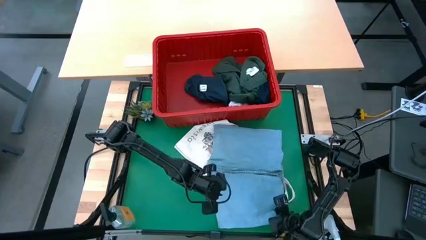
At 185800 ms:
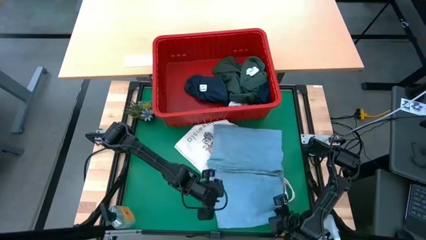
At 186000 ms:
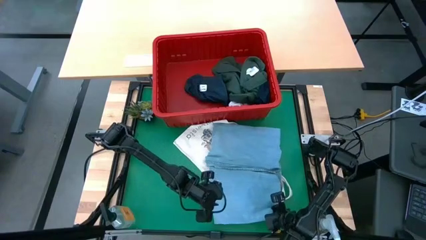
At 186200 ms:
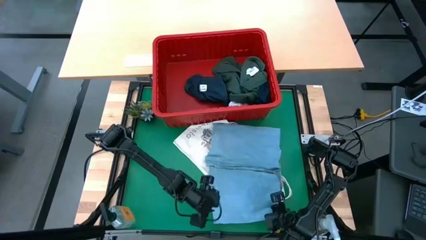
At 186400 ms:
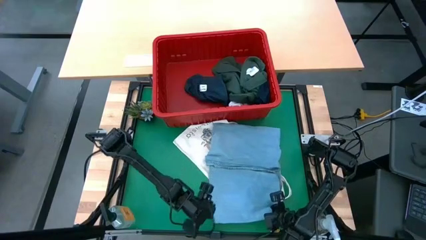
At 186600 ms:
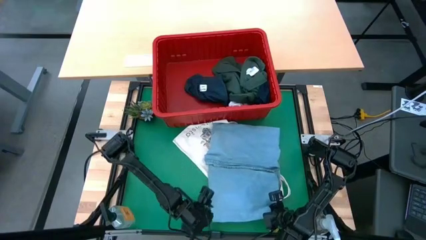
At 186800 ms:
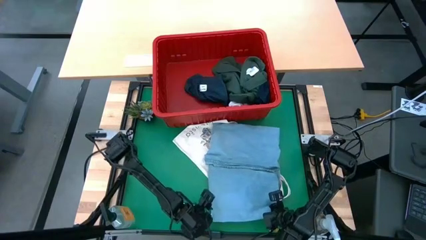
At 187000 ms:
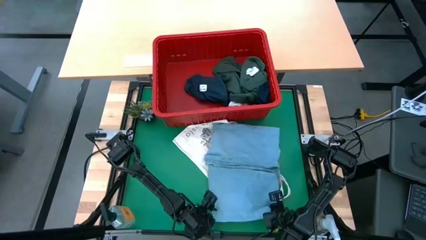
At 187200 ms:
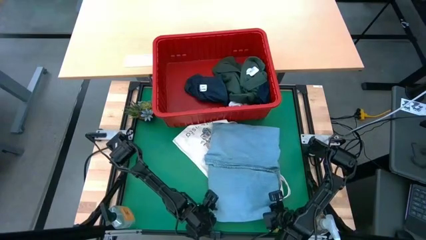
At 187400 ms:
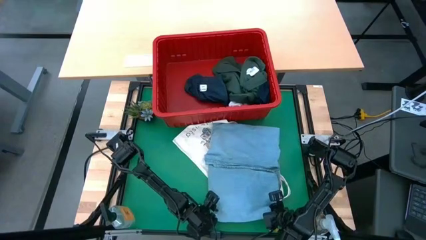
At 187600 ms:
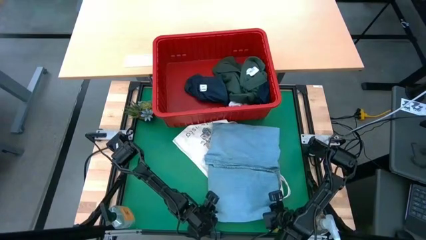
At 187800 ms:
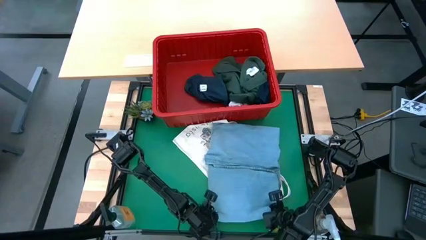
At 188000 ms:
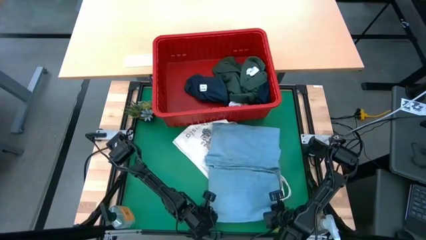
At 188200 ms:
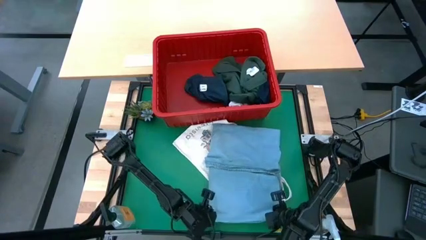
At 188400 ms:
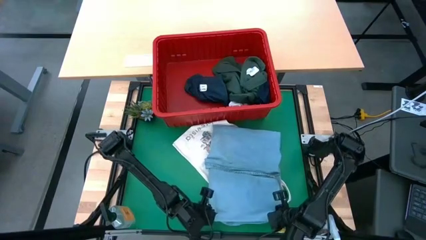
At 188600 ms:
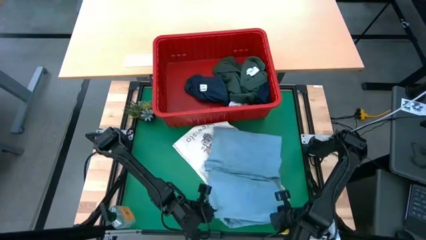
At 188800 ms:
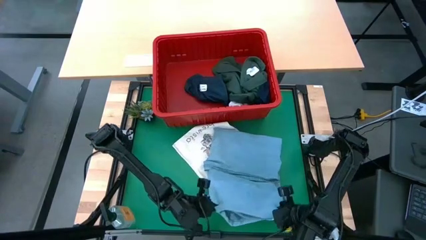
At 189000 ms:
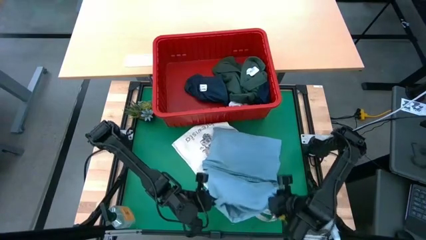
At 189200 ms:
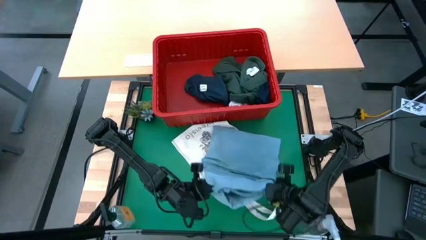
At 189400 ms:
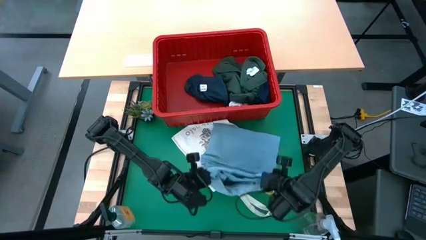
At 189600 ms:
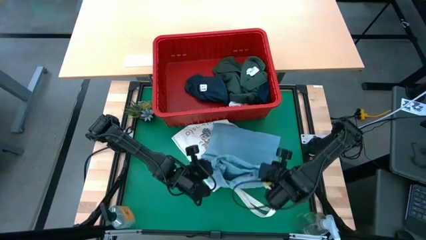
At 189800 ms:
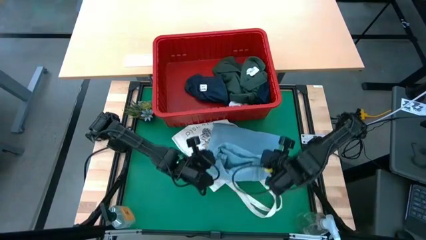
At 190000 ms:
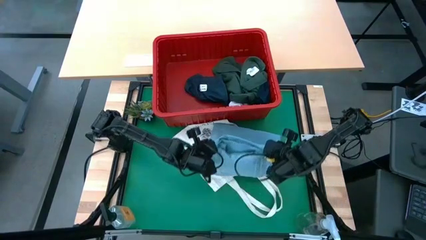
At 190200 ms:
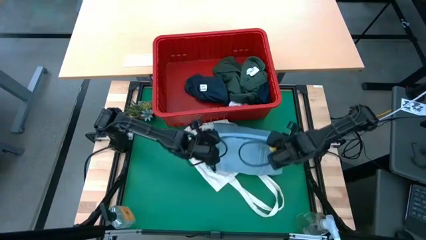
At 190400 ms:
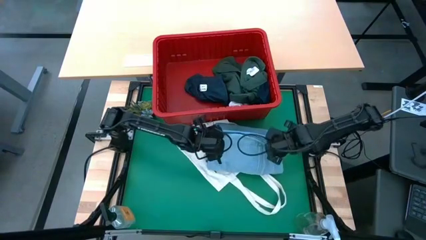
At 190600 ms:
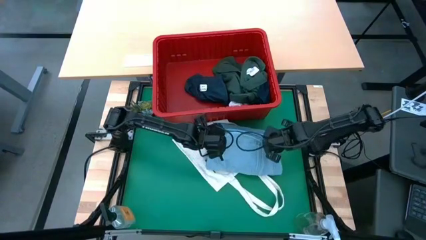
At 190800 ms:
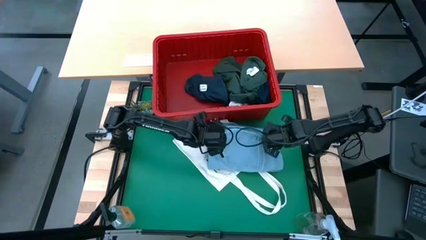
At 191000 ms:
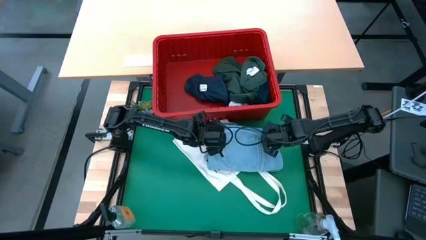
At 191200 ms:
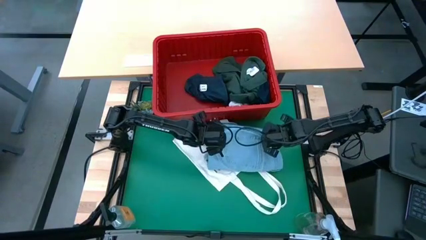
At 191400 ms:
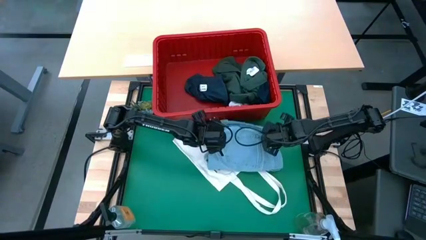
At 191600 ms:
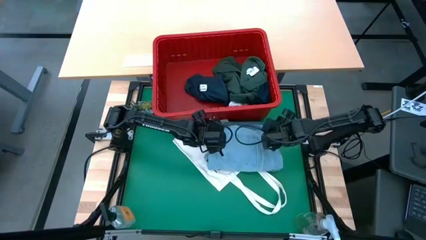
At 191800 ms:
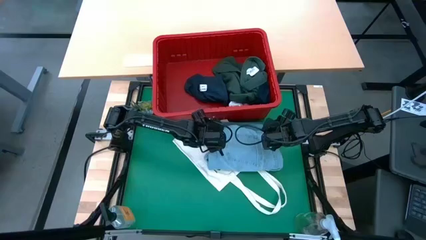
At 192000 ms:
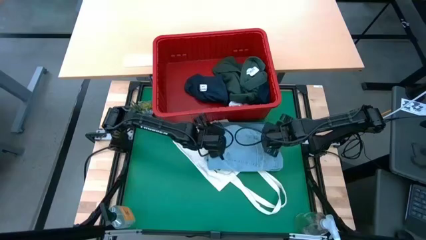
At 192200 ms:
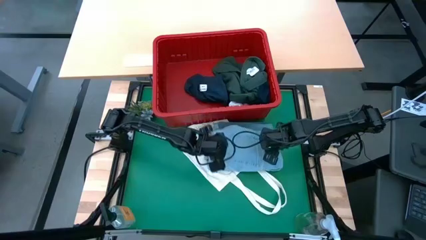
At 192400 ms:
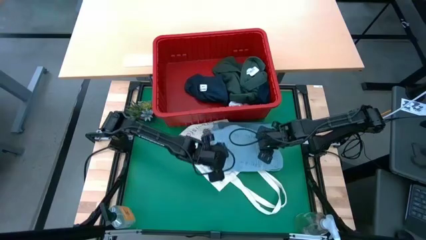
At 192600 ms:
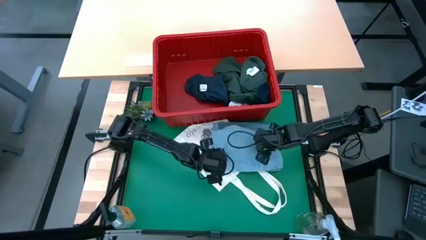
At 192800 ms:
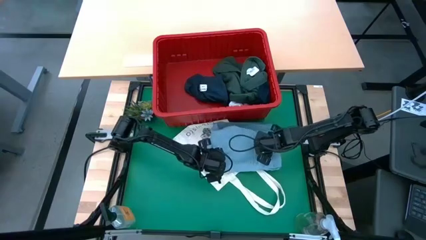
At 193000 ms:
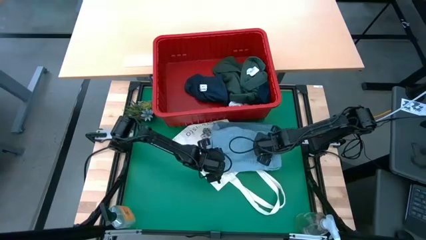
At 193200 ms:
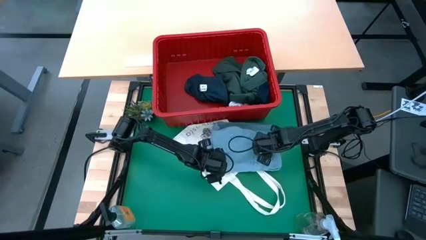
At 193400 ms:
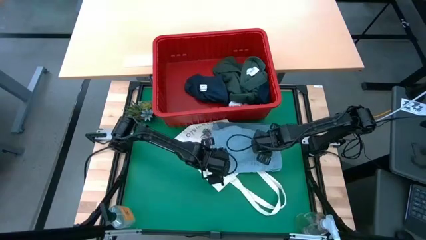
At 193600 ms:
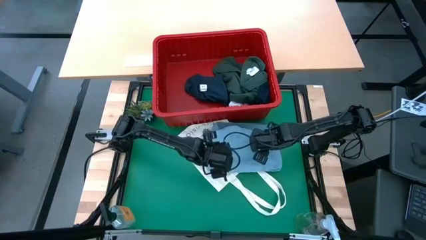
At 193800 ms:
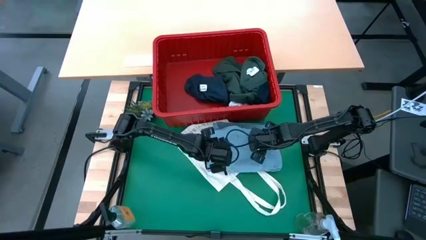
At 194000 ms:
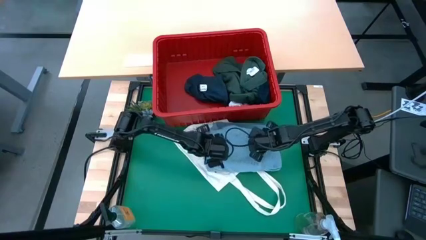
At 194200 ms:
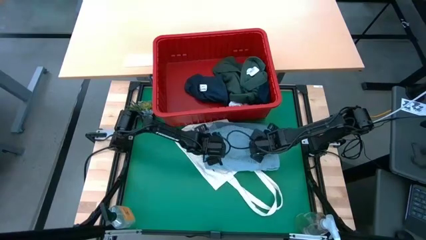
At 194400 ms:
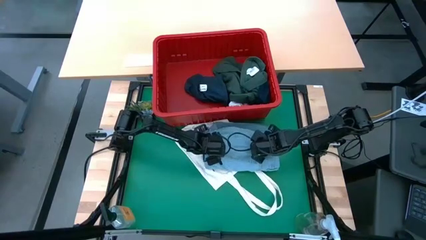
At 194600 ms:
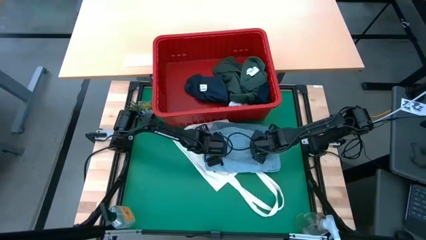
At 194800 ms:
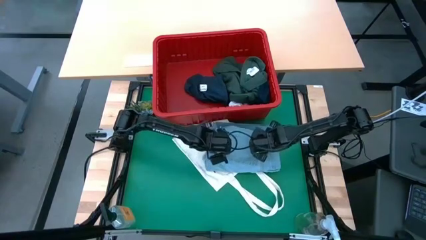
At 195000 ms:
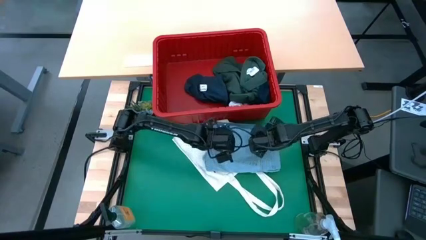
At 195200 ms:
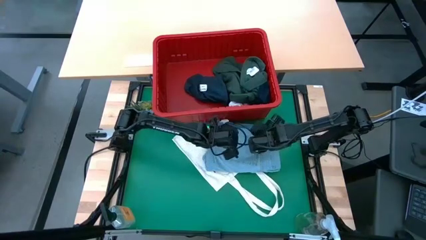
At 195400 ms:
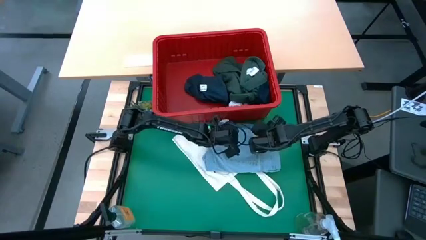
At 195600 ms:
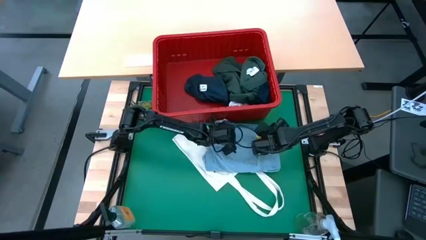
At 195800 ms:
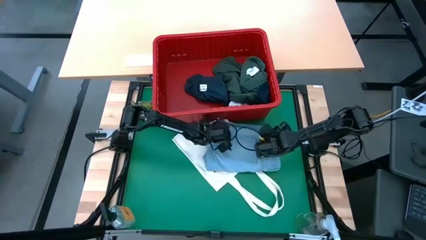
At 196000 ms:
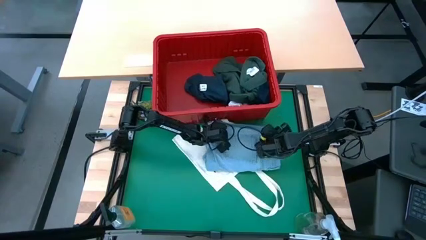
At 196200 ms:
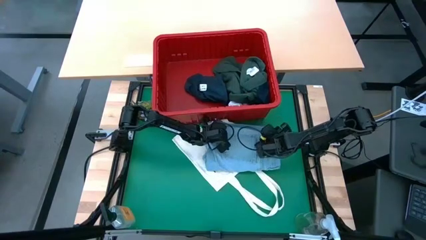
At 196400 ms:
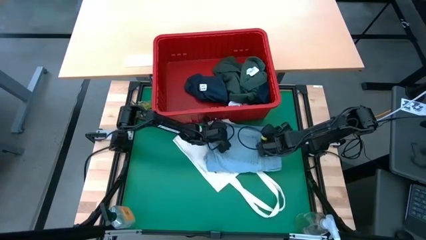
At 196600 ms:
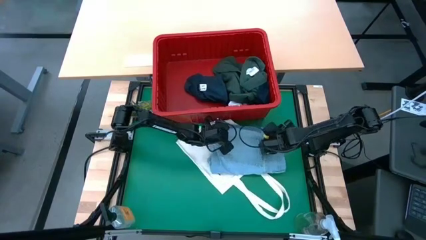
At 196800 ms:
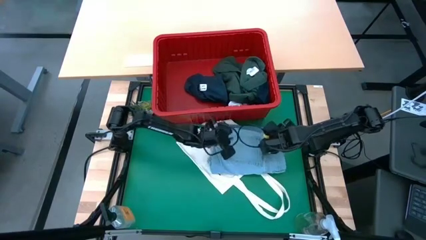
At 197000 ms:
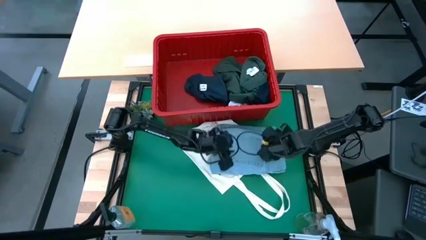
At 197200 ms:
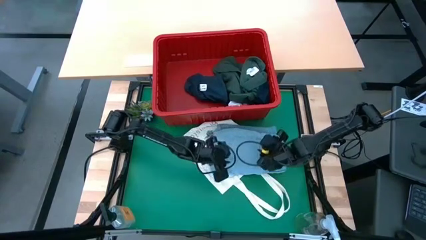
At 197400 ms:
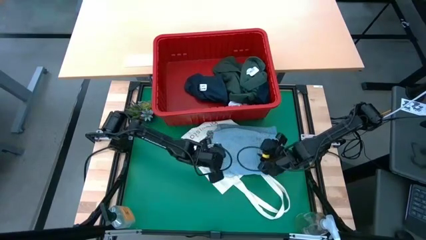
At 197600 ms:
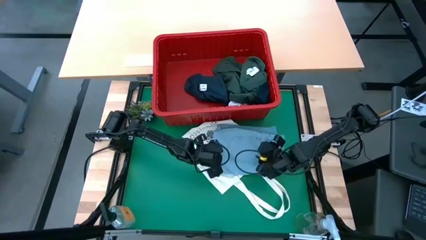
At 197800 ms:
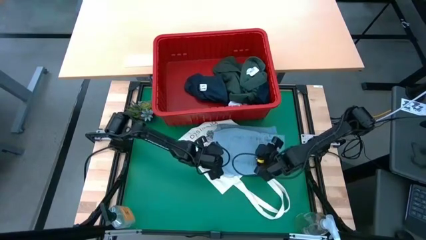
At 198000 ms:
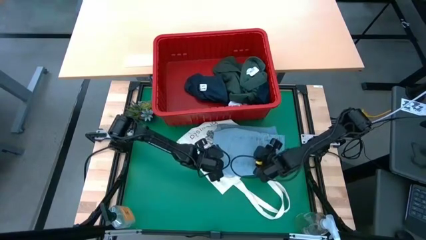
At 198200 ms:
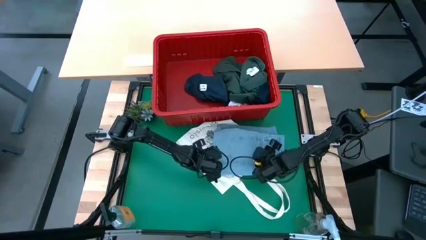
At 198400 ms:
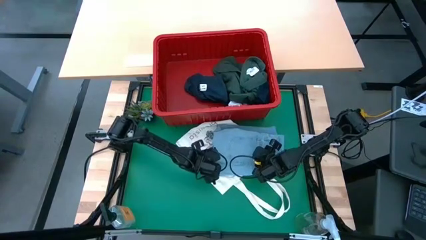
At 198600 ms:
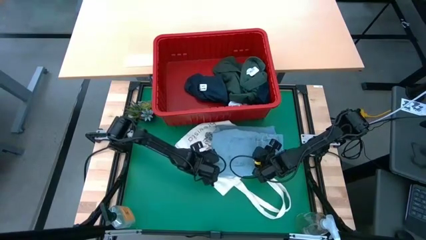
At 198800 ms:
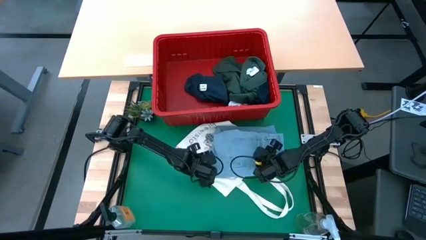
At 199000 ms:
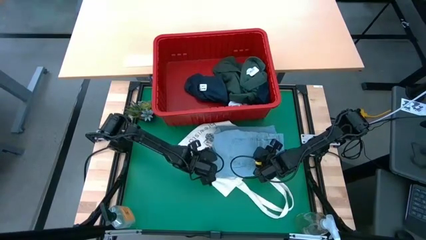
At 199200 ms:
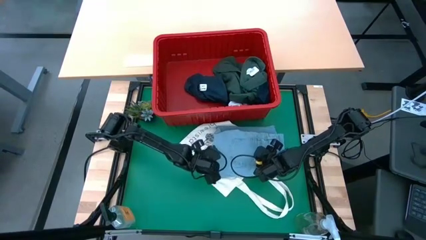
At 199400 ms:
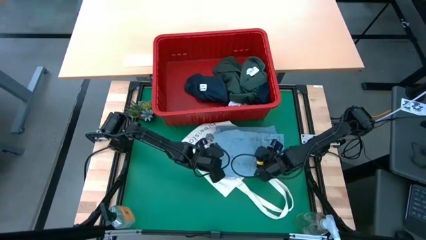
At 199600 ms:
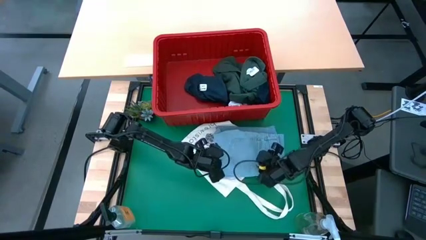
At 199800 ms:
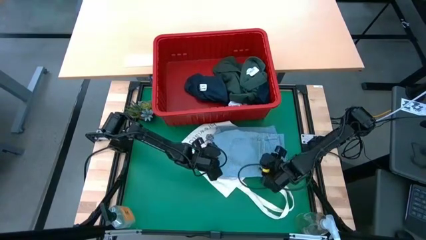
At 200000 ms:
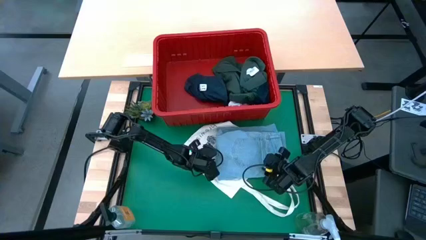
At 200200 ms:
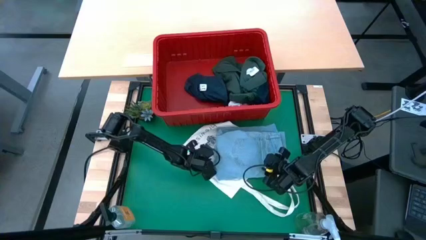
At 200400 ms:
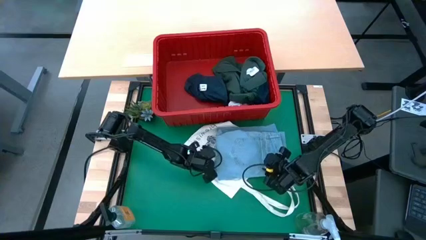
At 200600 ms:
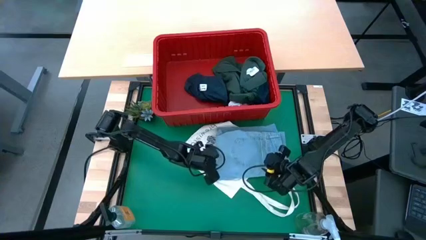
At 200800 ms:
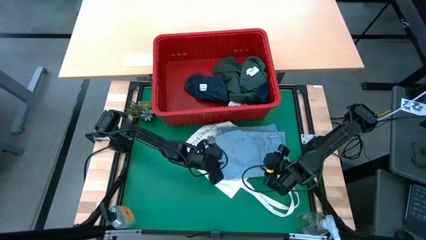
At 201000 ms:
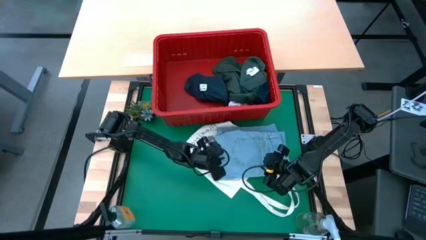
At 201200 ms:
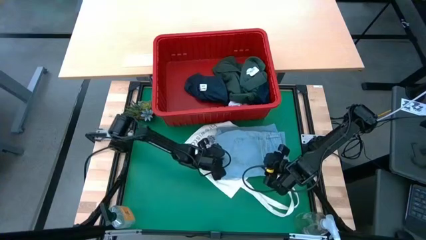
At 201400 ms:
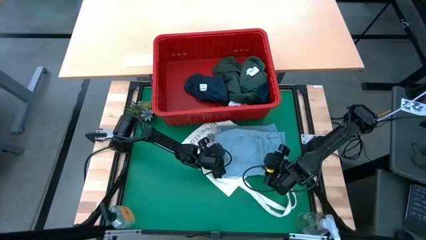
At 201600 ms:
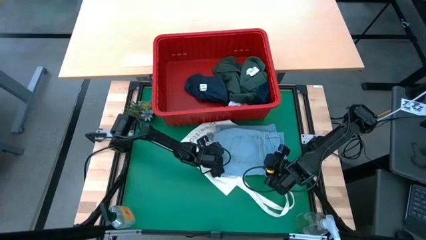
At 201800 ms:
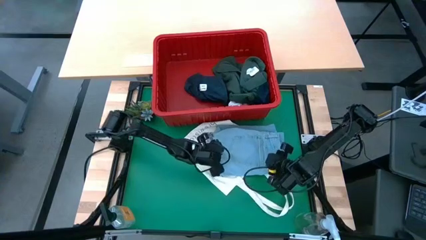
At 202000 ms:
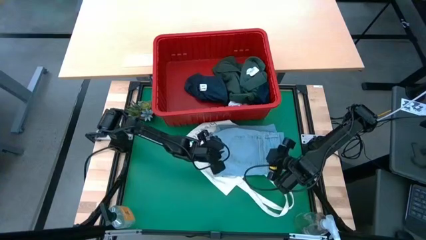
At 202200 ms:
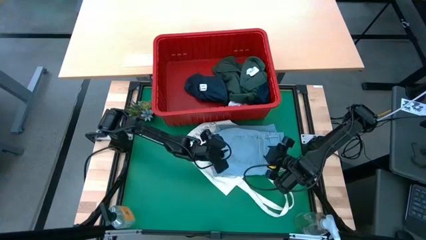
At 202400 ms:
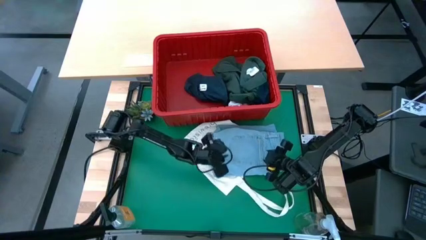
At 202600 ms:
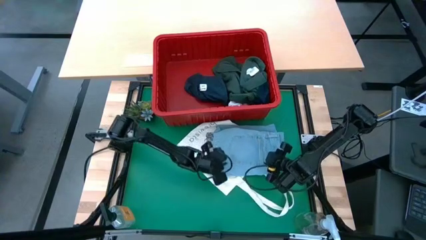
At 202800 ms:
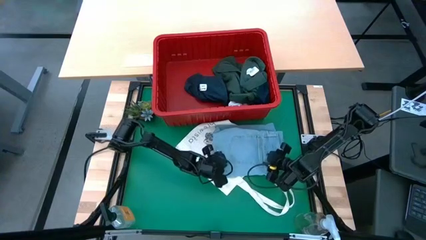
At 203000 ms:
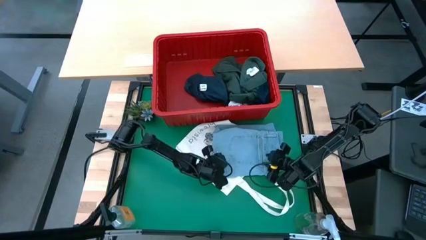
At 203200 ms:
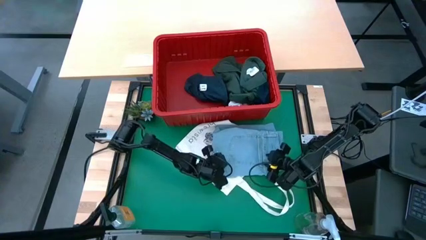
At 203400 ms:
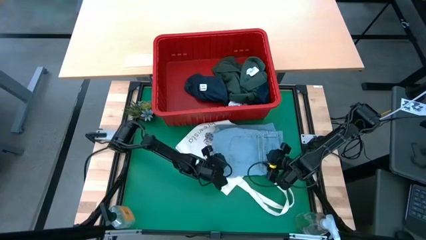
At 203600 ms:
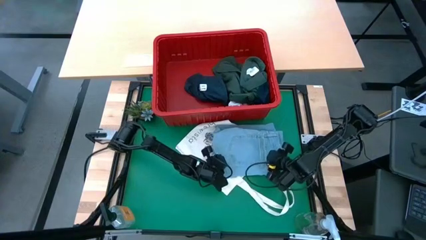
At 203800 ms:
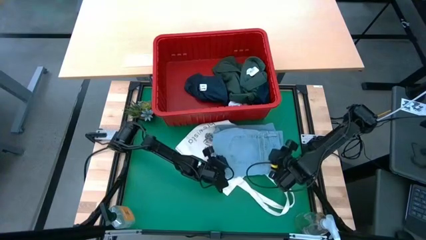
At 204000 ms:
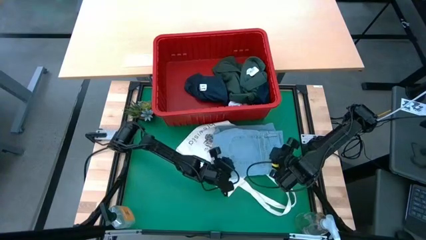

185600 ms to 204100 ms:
Task: Fold laundry
Fold the light blue pants
